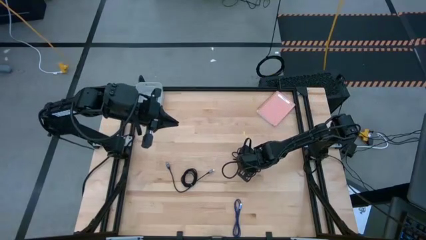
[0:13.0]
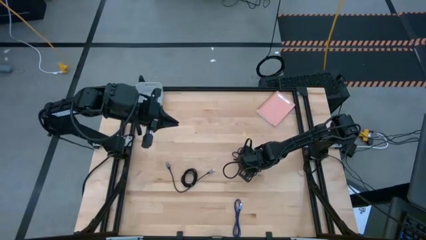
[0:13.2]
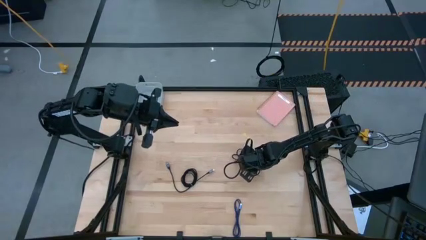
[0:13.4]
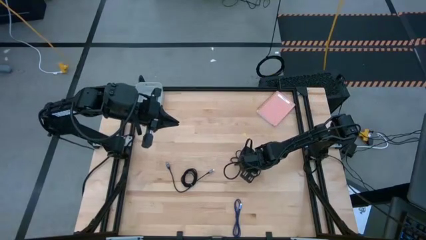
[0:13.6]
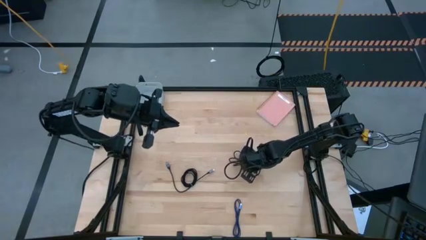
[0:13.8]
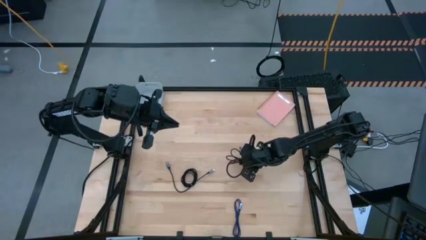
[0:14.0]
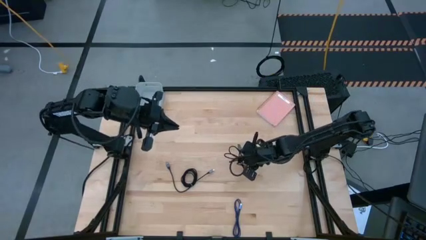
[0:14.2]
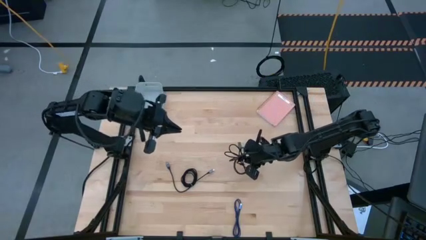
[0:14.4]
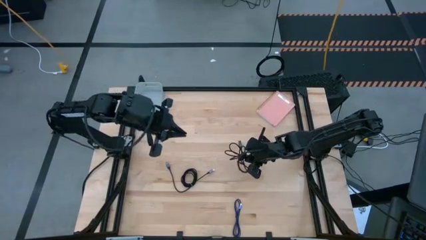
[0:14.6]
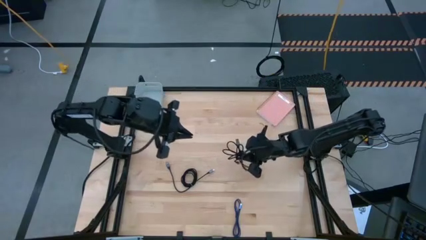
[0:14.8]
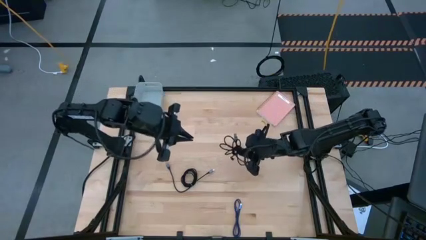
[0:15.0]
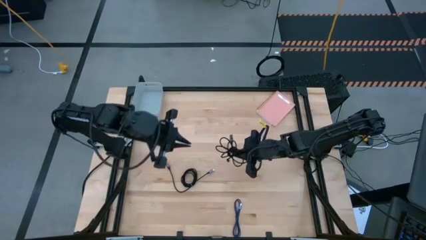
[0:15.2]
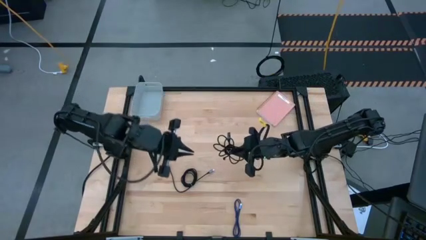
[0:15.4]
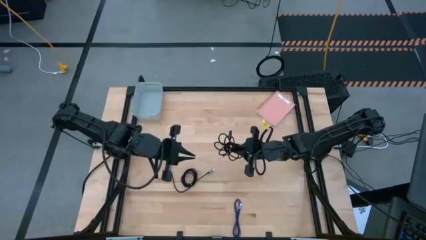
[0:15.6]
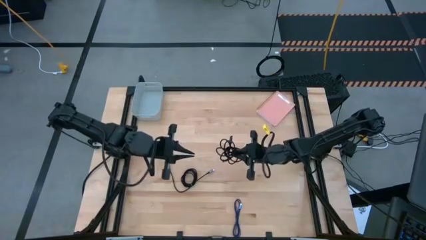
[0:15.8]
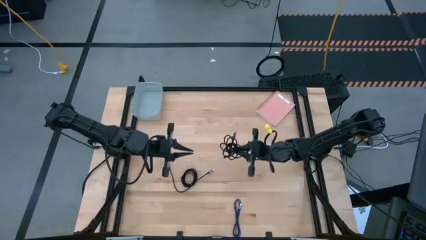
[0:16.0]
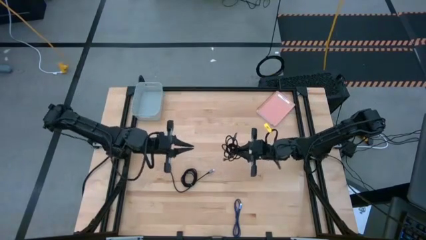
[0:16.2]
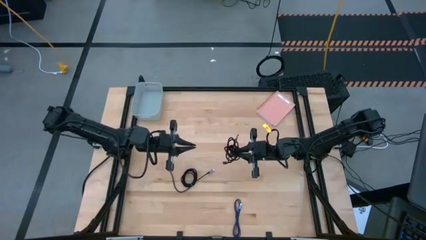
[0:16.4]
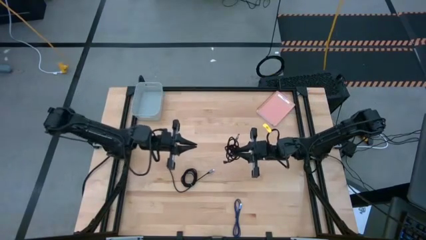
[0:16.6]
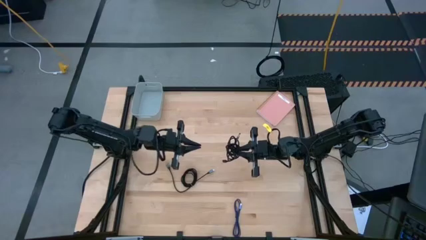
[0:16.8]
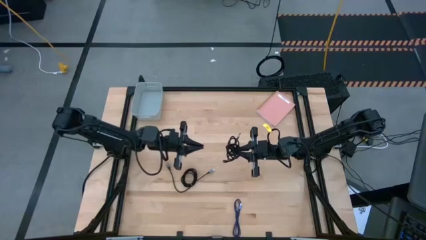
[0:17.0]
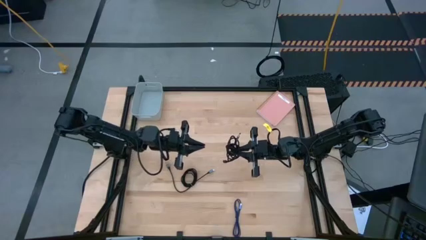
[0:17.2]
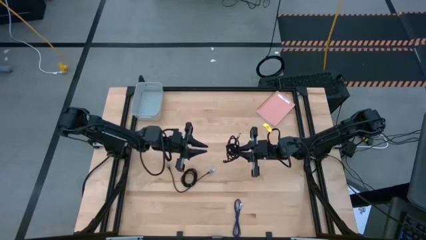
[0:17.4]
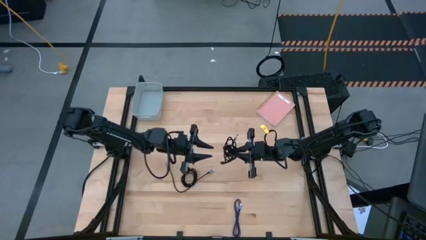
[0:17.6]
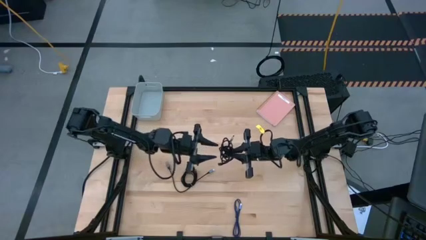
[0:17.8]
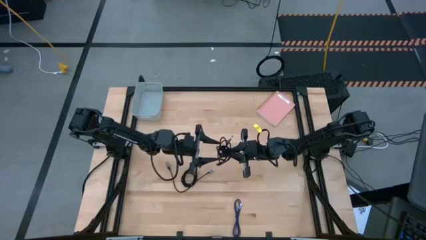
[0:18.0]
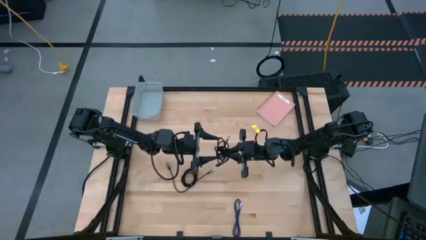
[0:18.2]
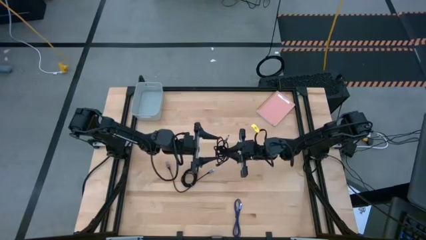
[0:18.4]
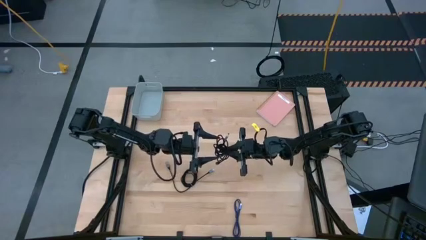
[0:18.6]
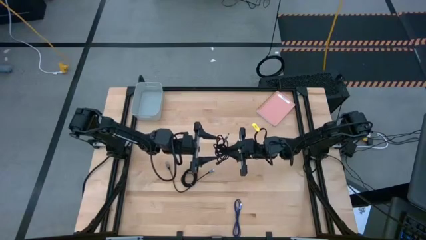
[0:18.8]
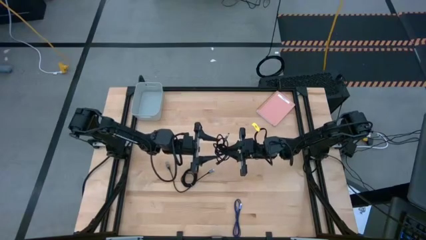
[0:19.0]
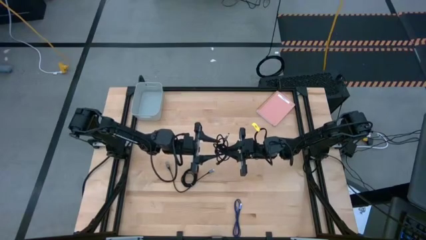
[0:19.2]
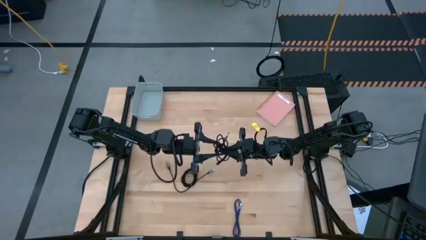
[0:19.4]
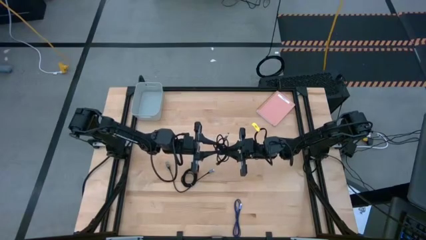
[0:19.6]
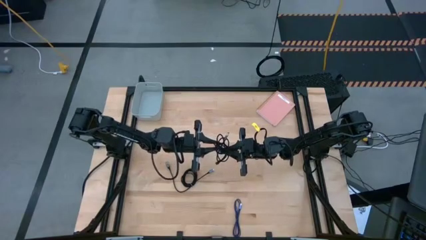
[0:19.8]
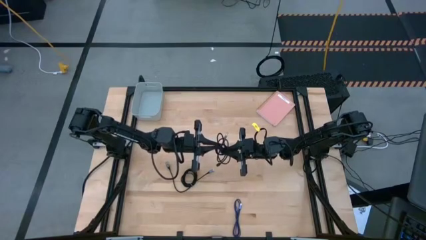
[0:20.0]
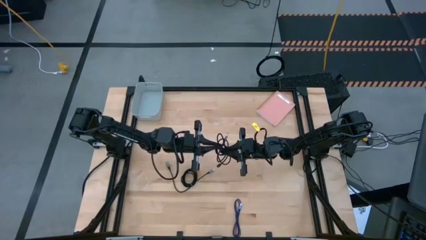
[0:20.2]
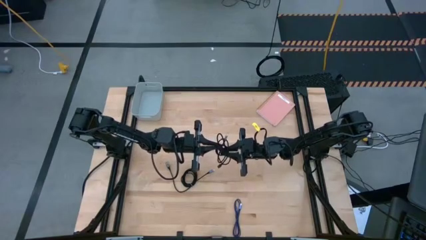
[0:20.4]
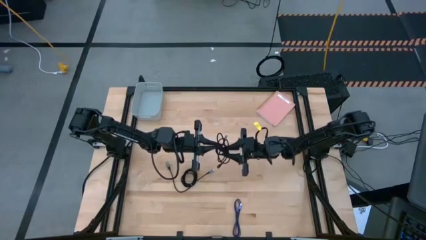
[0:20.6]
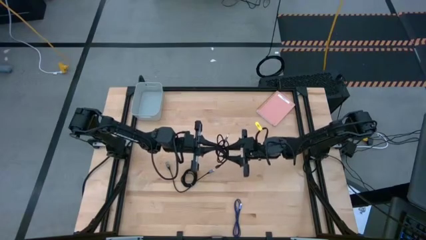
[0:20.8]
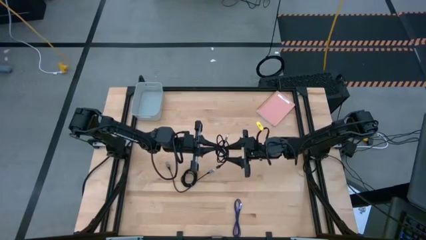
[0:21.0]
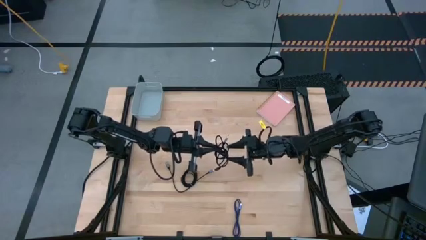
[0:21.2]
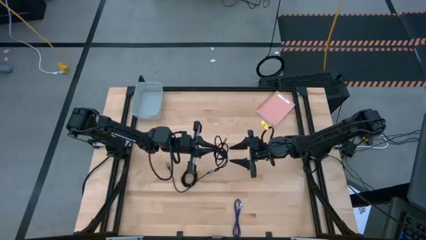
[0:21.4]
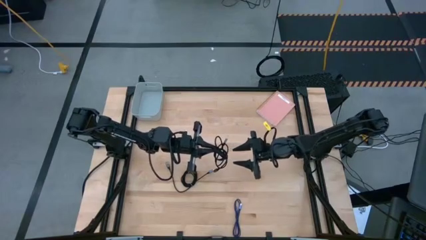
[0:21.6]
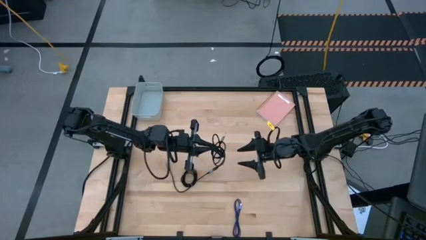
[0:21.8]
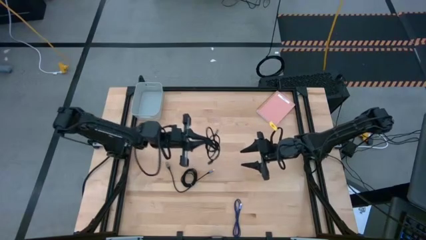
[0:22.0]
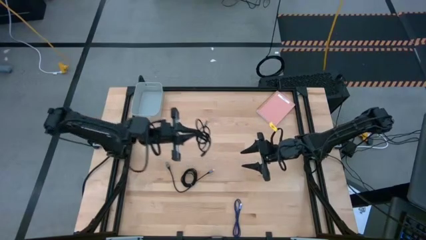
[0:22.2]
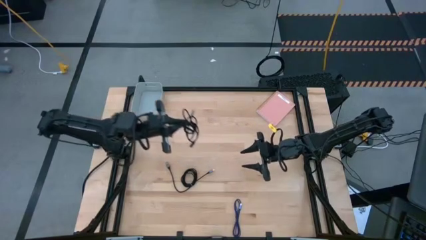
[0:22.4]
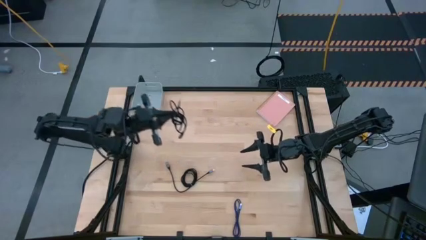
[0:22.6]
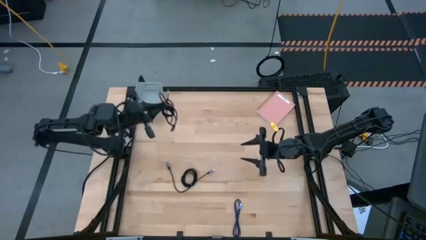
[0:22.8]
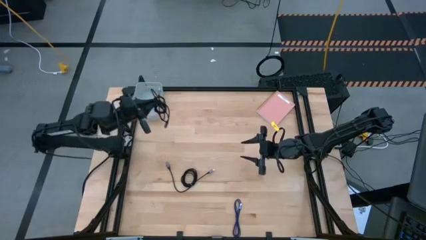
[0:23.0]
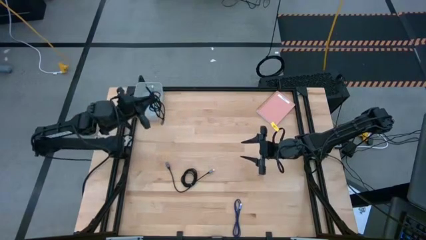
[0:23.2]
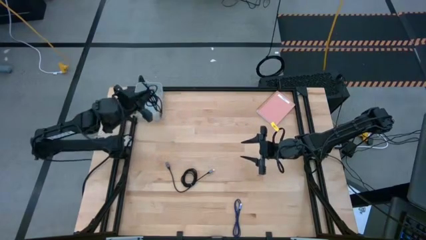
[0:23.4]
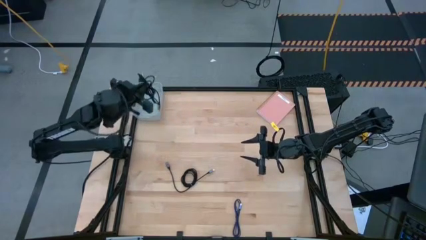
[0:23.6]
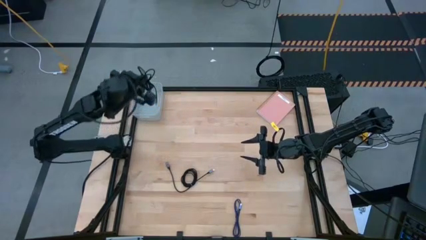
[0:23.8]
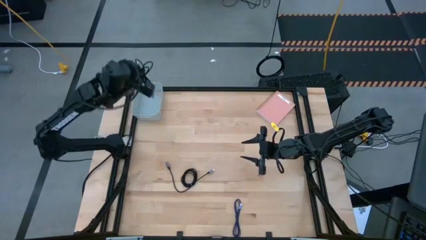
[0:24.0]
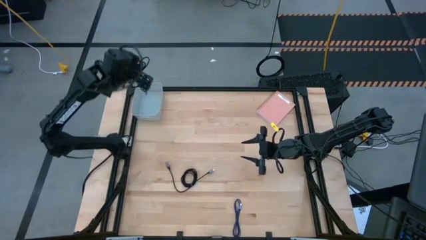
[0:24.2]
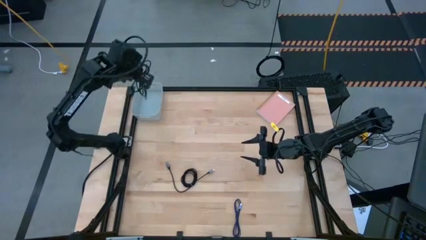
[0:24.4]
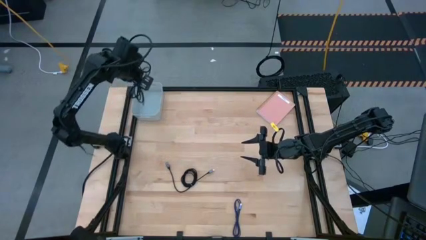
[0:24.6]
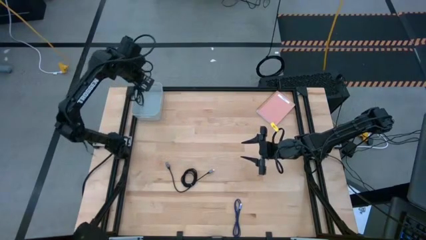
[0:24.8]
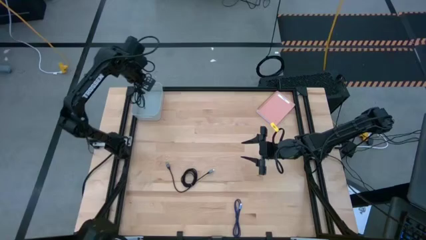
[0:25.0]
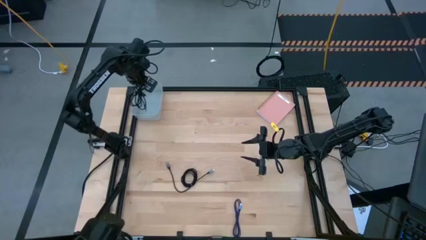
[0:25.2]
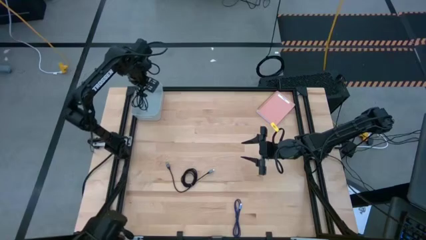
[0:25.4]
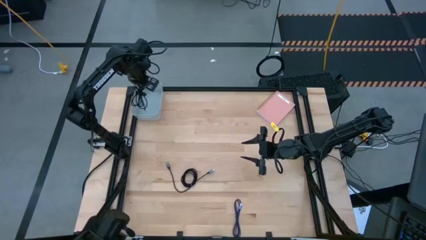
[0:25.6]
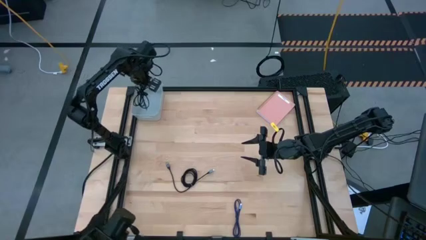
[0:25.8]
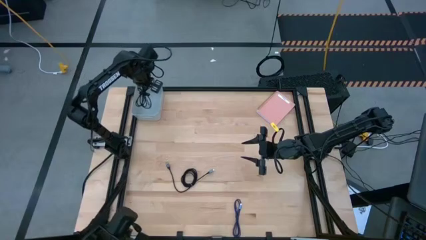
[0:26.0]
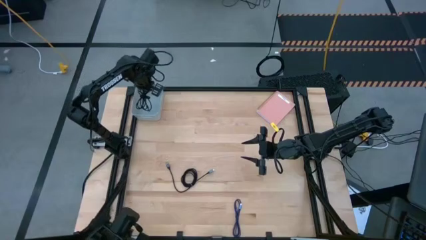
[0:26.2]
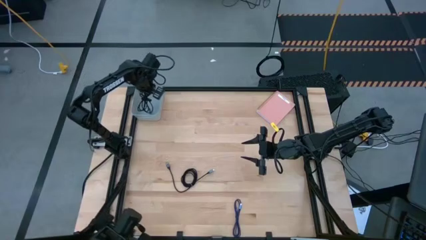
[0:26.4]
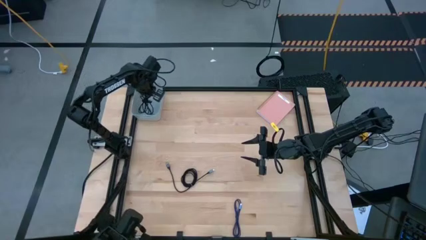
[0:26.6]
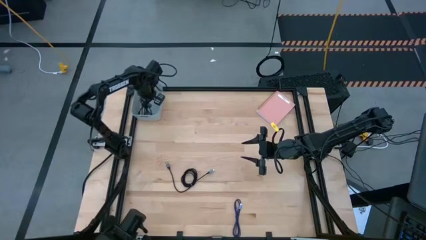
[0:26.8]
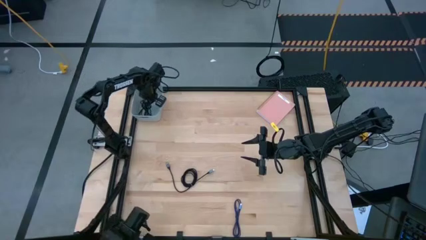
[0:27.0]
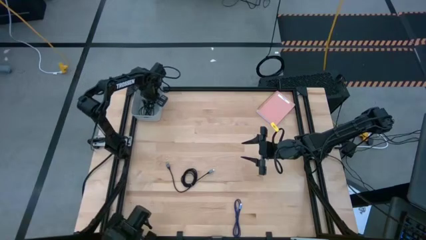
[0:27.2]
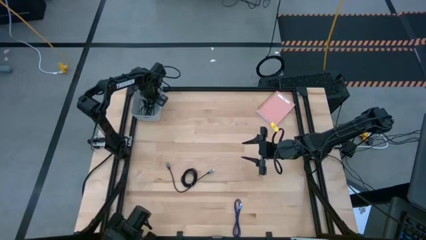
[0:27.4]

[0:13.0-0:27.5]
Task: Pick and place USB-C Cables
Put the right black charger cable into the gray bin
